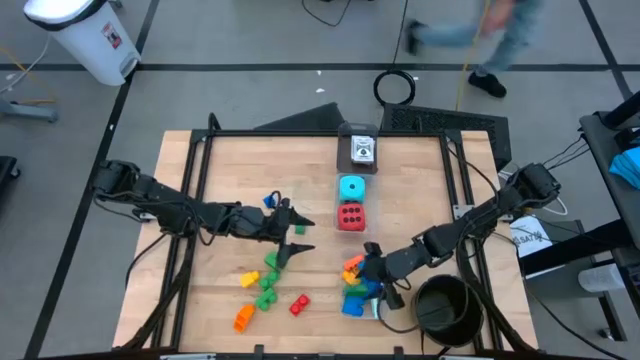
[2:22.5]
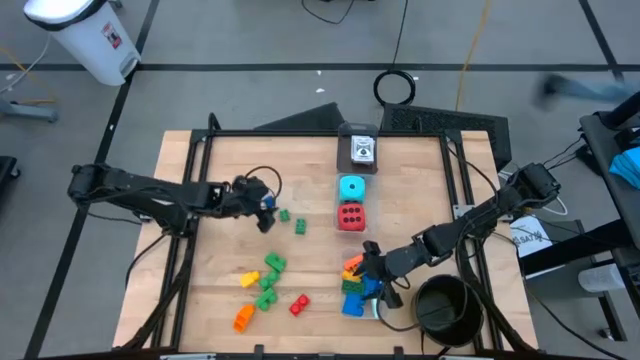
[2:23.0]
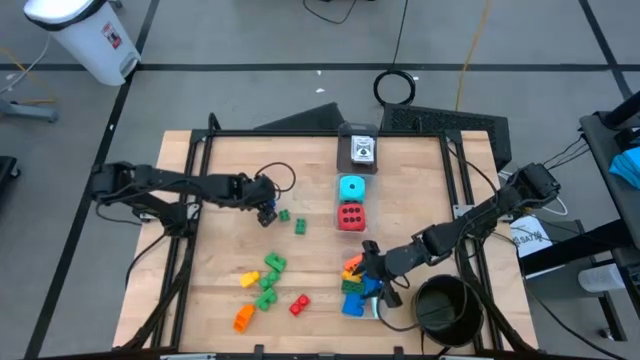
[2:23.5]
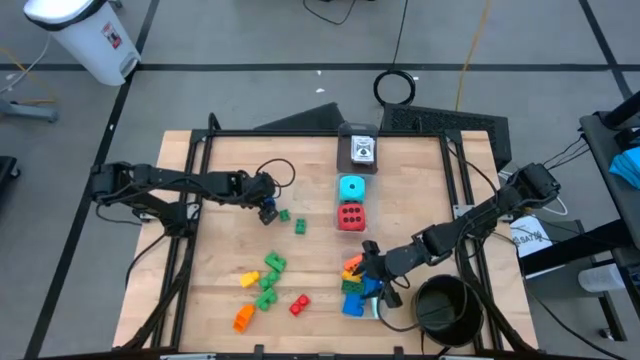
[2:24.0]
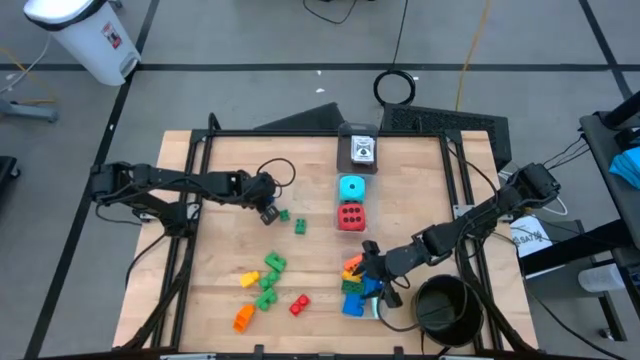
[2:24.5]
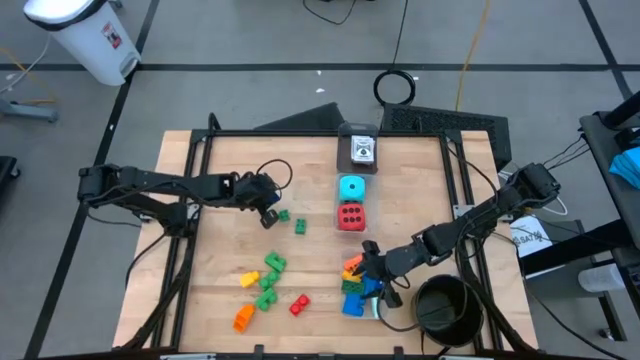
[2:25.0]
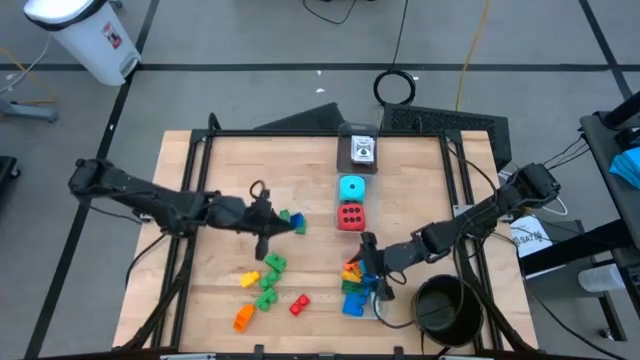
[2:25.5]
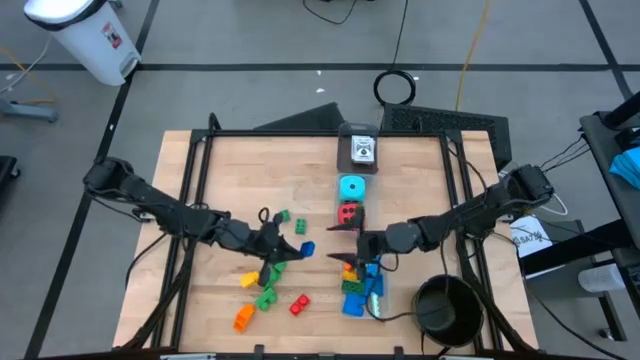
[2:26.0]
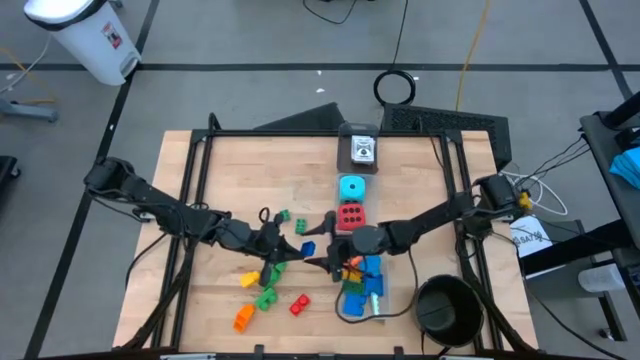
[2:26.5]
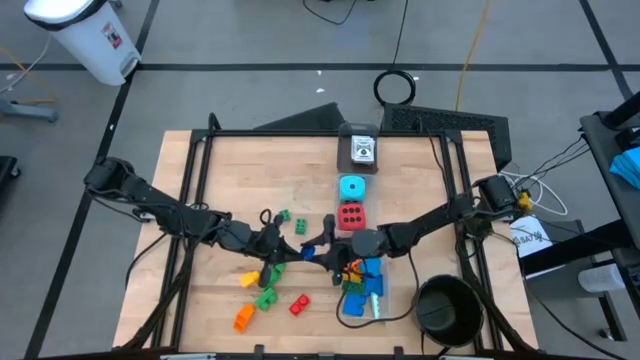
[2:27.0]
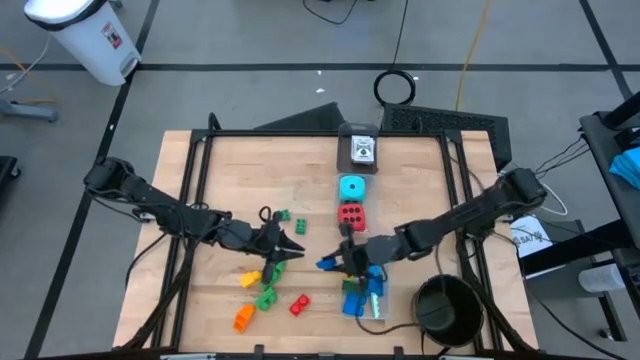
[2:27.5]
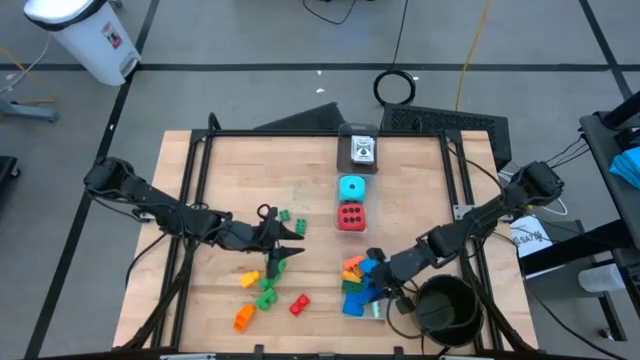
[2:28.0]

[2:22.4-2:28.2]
Task: Pick & Place Toys
Put the blue 4 stud game piece into the bottom transparent bin

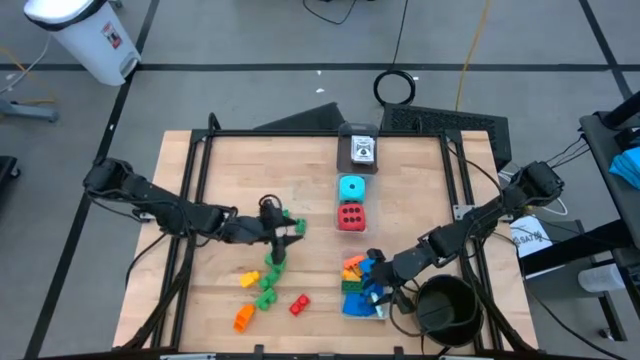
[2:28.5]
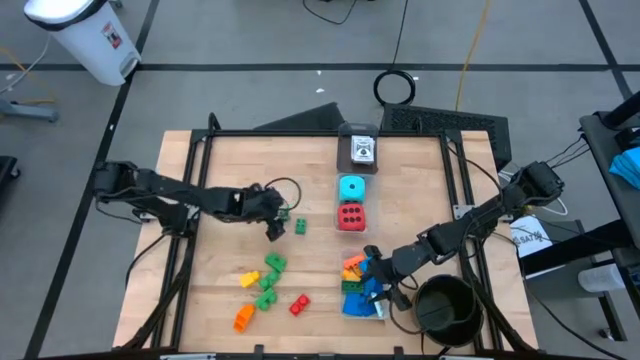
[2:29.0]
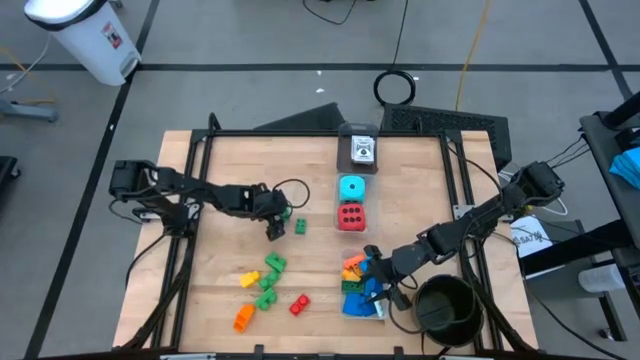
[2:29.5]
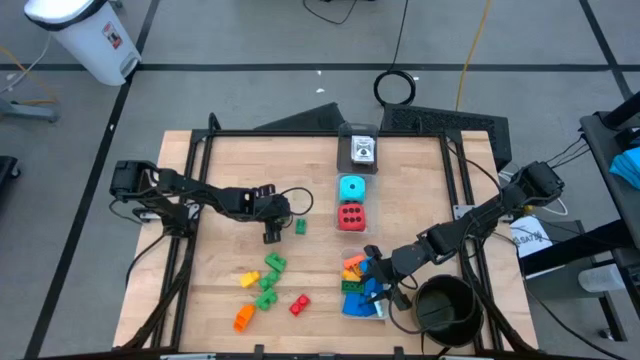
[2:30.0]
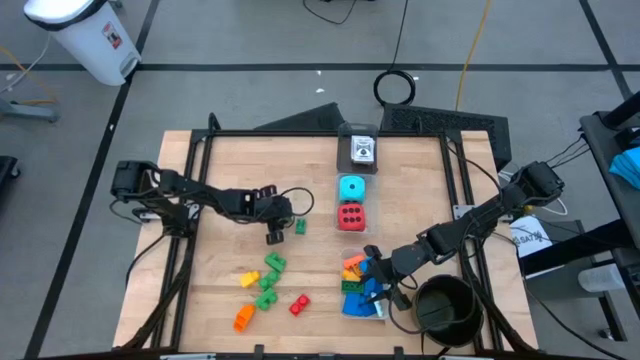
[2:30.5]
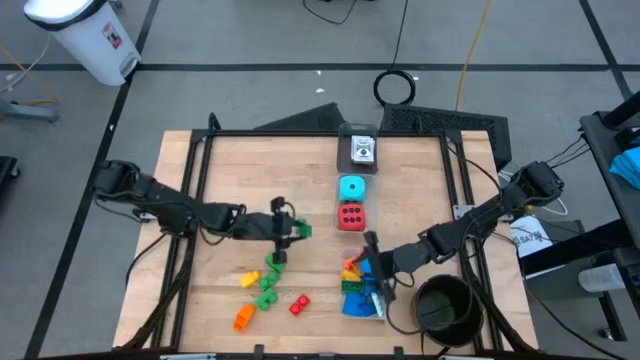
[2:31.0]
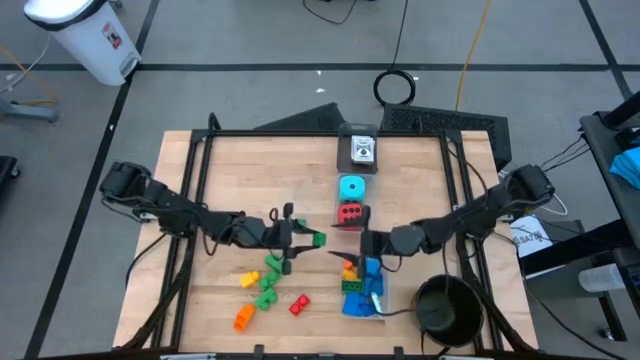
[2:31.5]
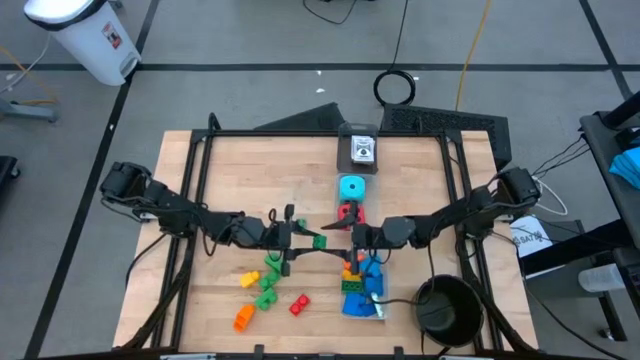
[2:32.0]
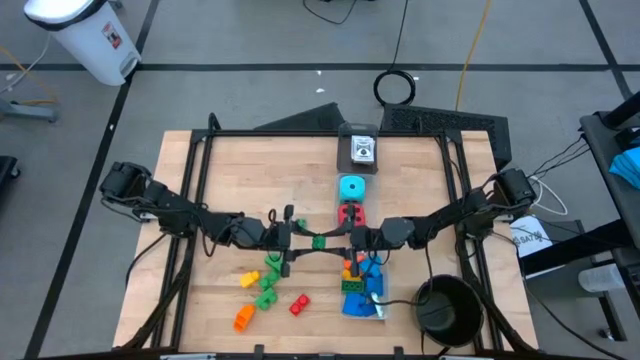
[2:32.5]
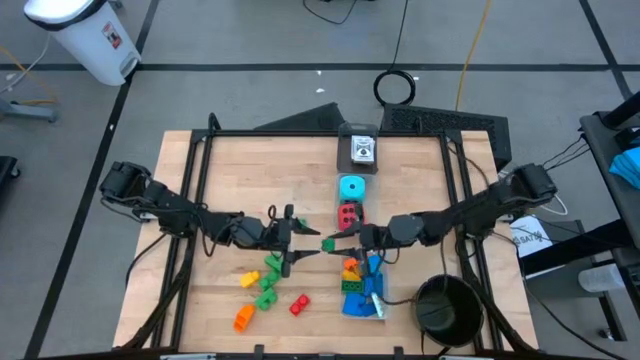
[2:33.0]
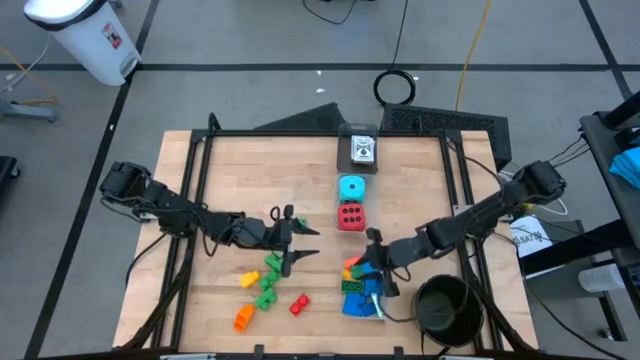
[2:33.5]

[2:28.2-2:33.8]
Put the green 4 stud game piece into the bottom transparent bin

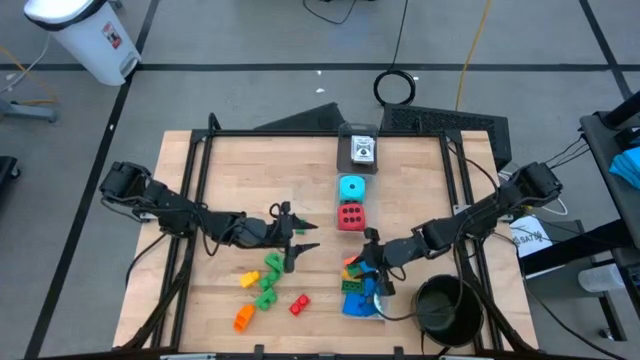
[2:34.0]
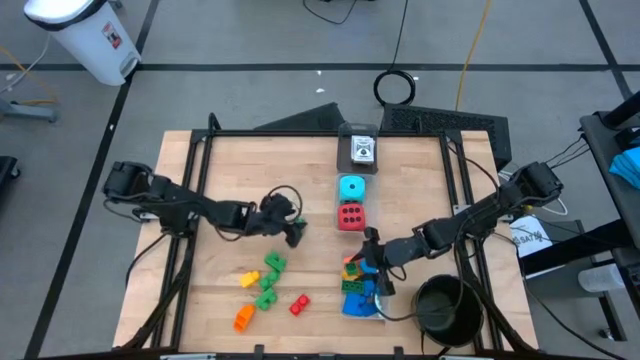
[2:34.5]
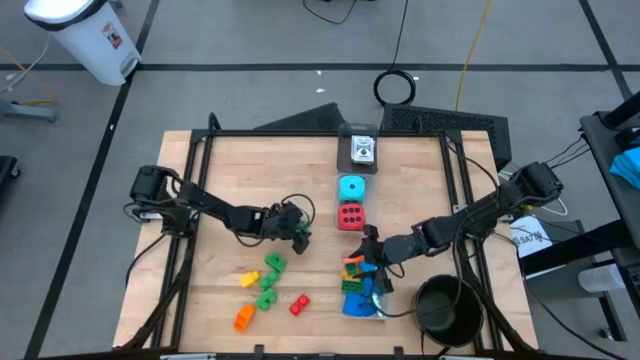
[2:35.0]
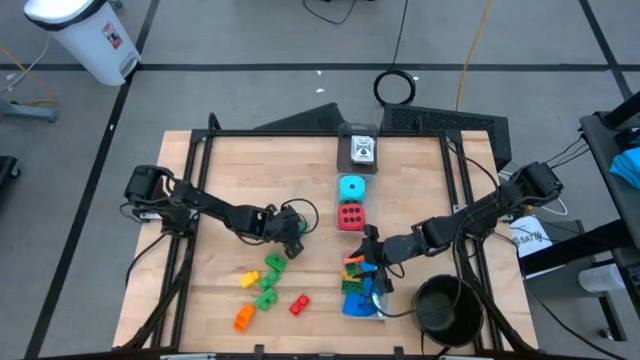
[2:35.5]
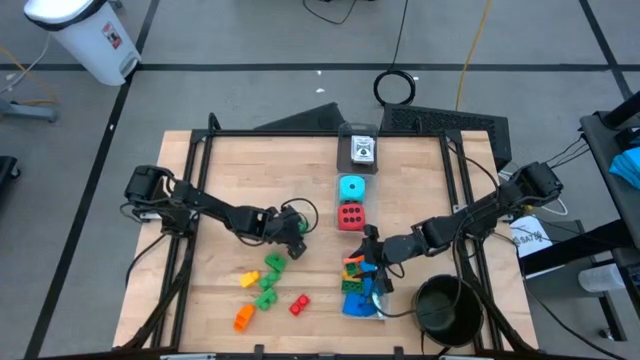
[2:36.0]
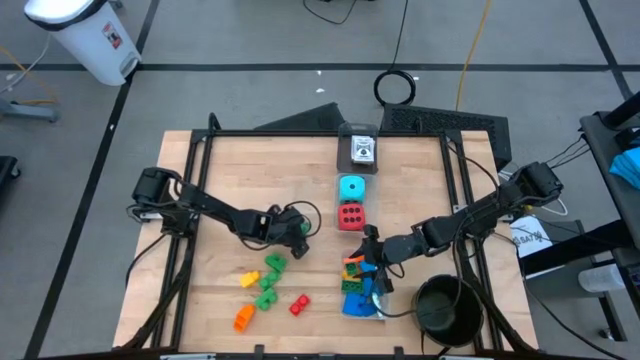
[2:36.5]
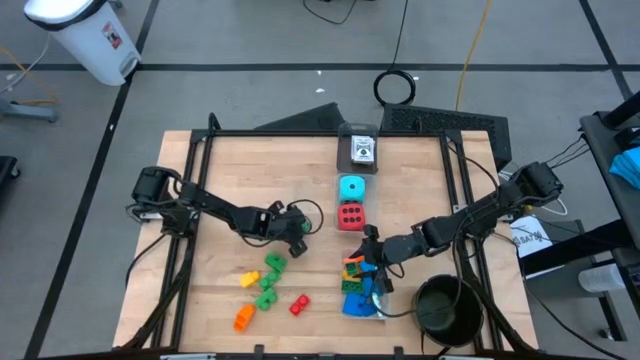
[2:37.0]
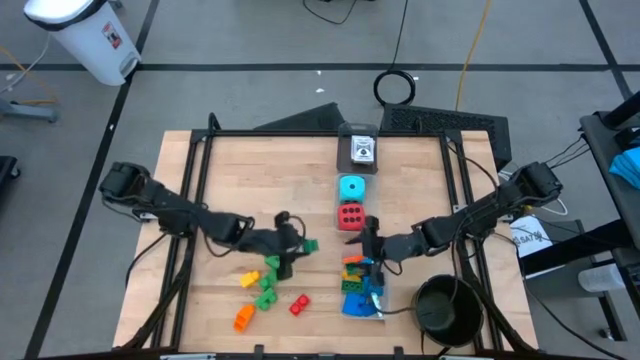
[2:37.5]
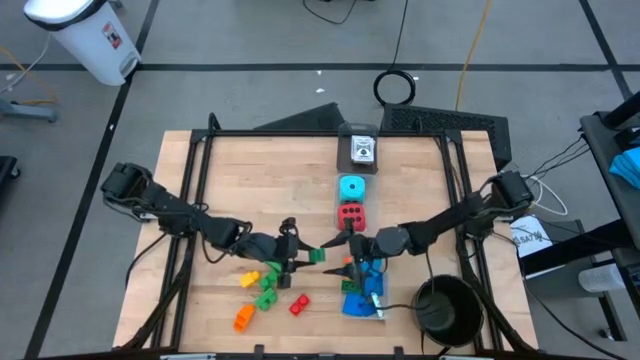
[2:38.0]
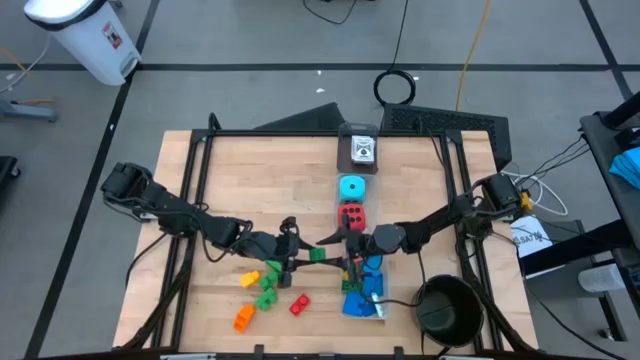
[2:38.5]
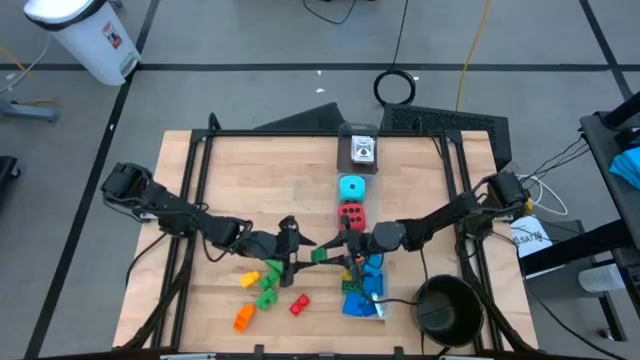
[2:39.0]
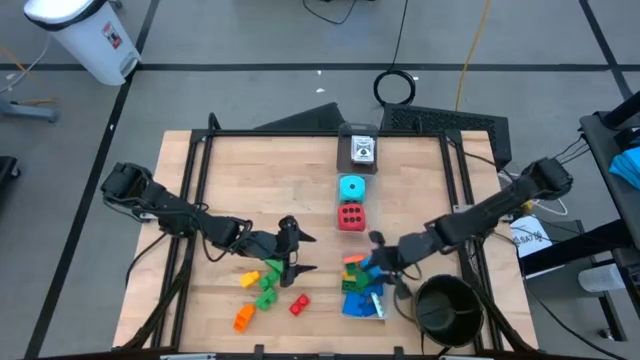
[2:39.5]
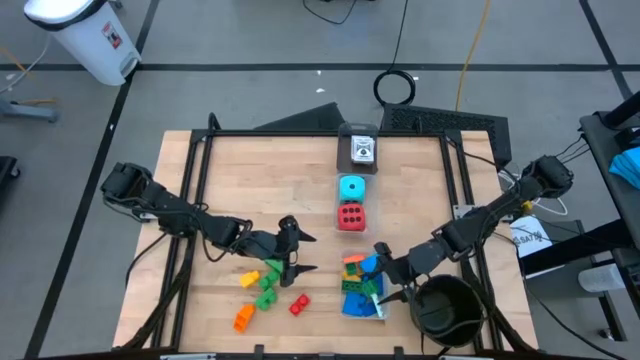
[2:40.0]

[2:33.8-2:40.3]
Put the green 4 stud game piece into the bottom transparent bin

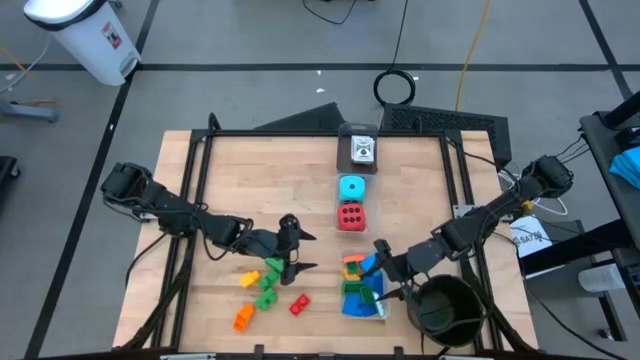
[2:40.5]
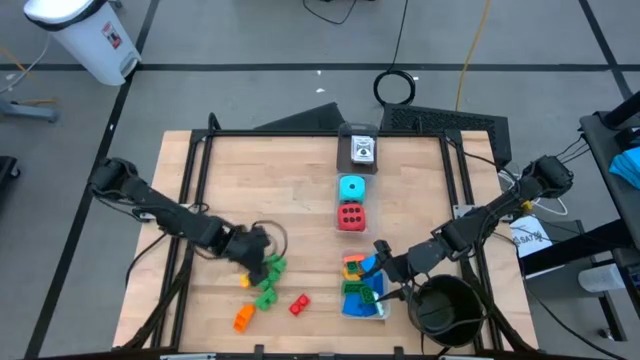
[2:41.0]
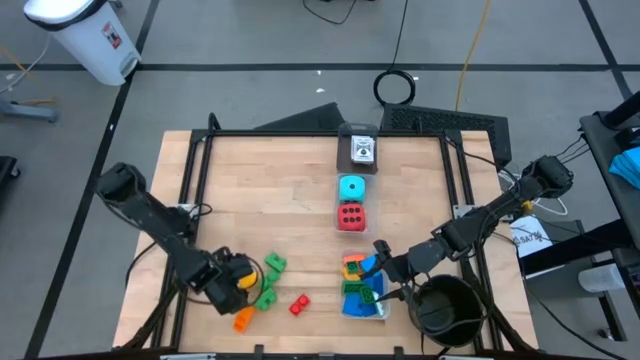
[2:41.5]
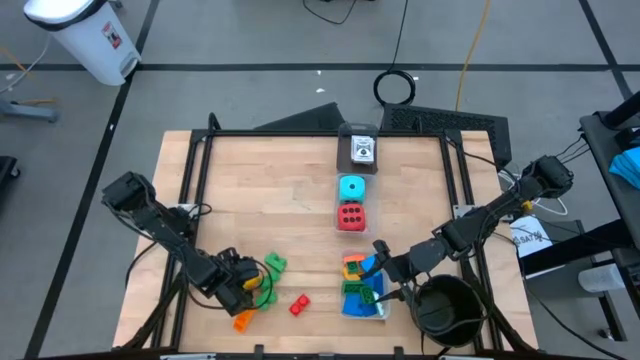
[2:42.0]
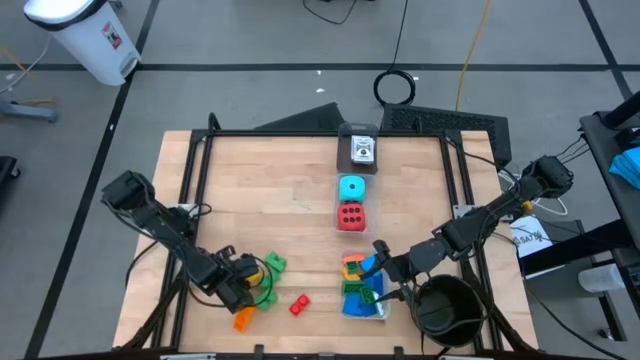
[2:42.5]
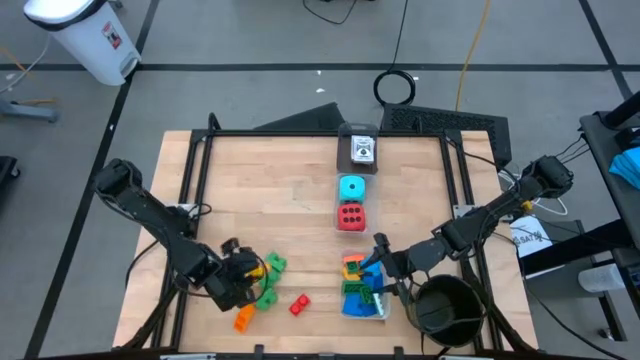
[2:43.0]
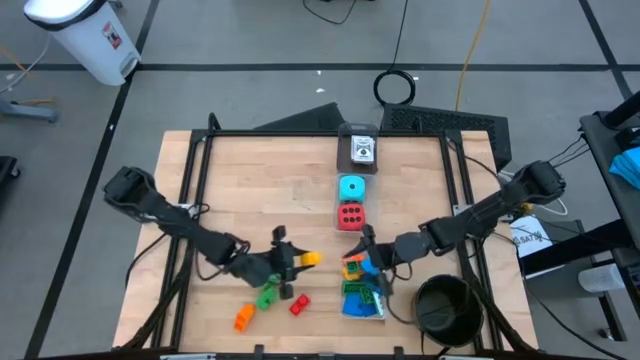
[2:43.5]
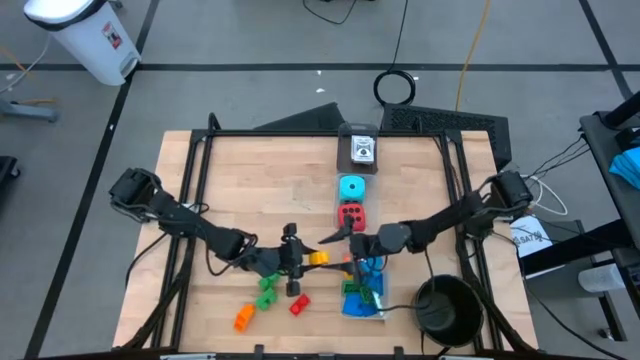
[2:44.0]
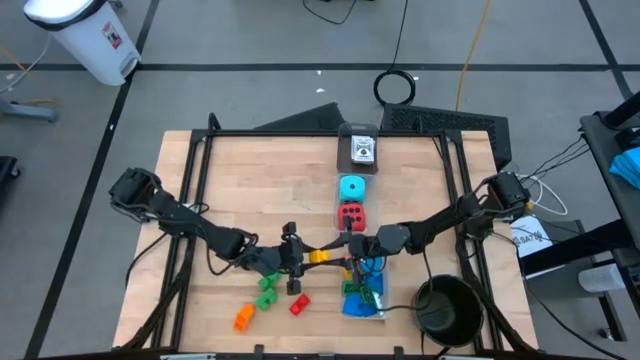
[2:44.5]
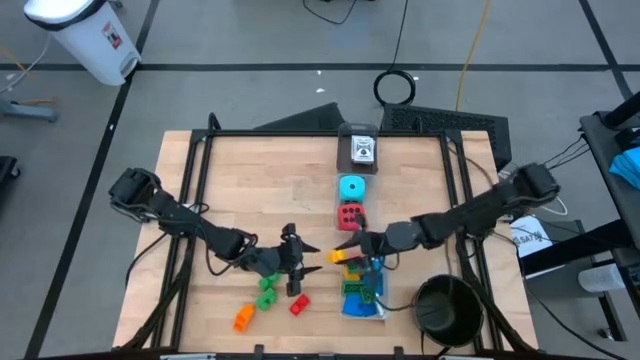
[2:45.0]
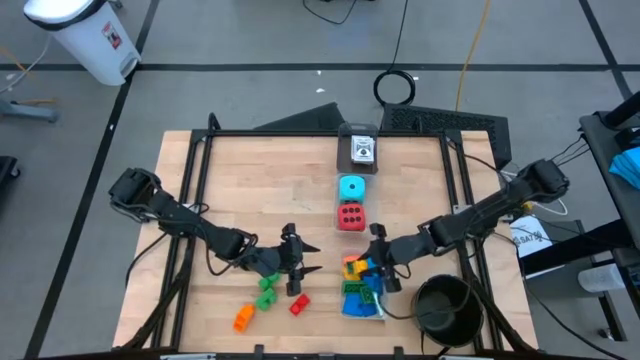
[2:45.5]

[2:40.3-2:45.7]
Put the yellow 1 stud game piece into the bottom transparent bin
